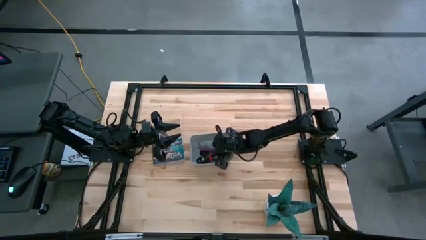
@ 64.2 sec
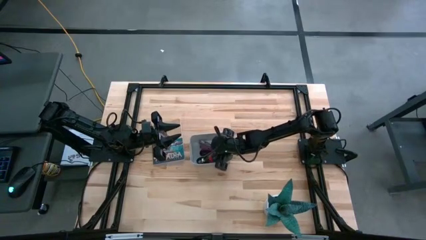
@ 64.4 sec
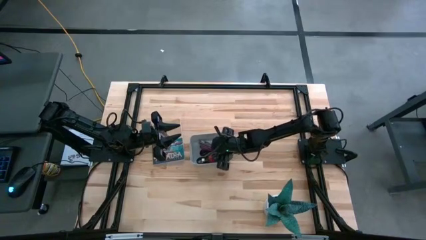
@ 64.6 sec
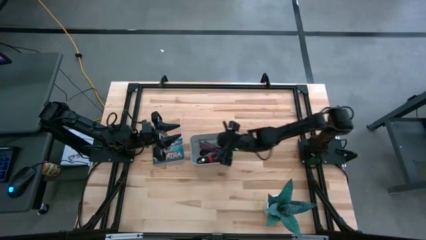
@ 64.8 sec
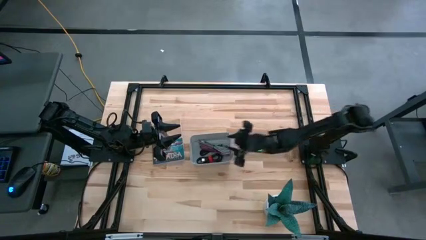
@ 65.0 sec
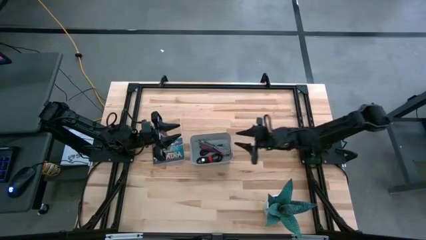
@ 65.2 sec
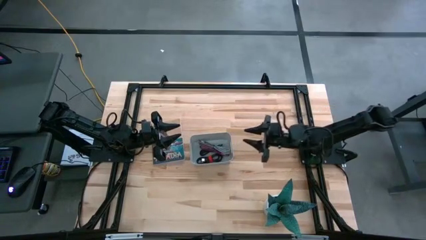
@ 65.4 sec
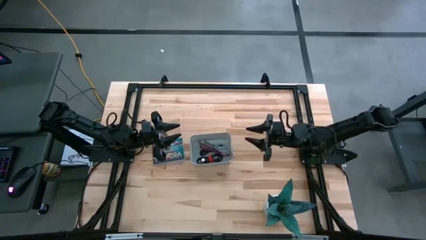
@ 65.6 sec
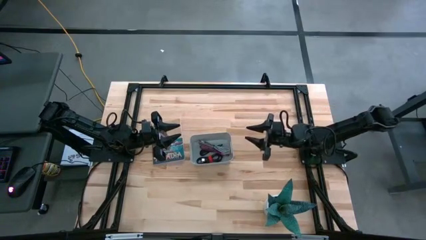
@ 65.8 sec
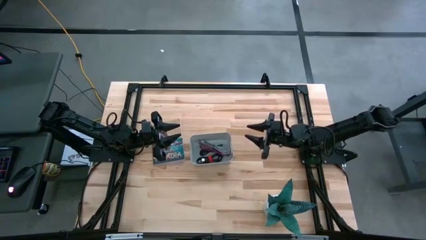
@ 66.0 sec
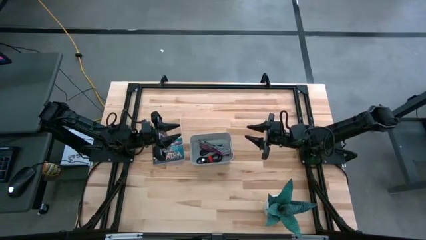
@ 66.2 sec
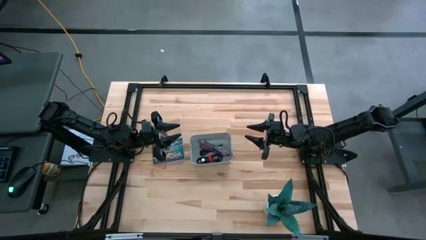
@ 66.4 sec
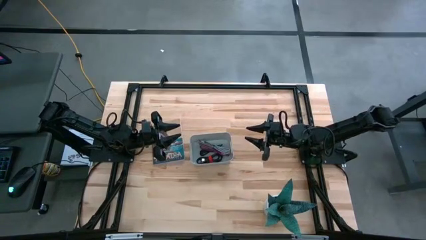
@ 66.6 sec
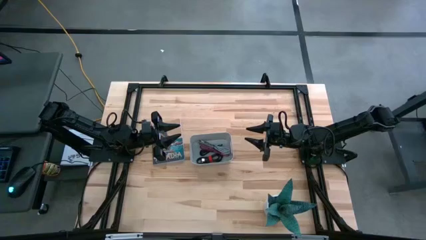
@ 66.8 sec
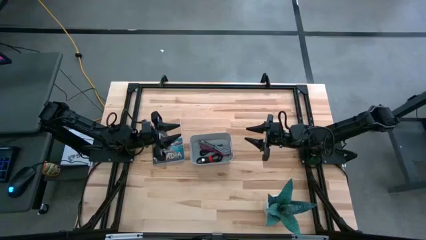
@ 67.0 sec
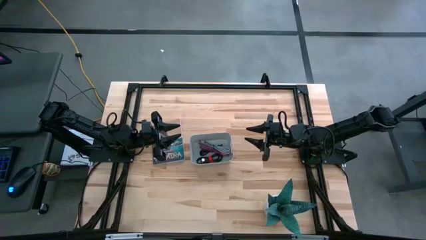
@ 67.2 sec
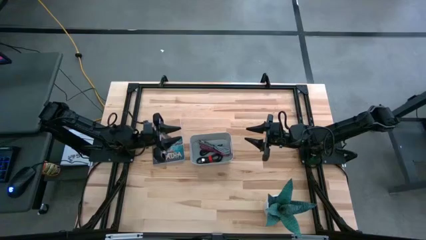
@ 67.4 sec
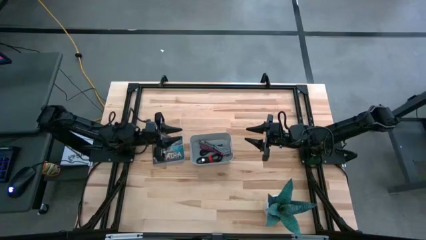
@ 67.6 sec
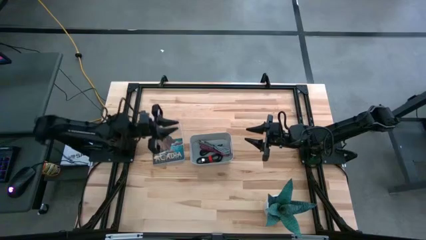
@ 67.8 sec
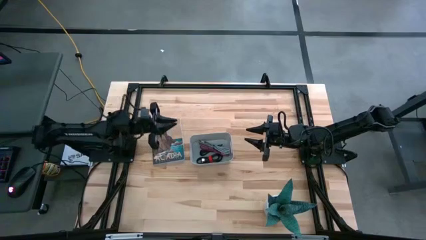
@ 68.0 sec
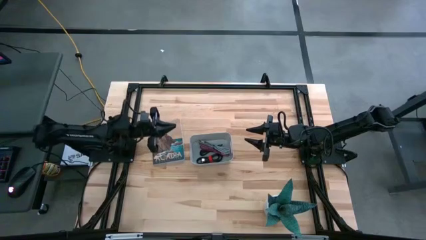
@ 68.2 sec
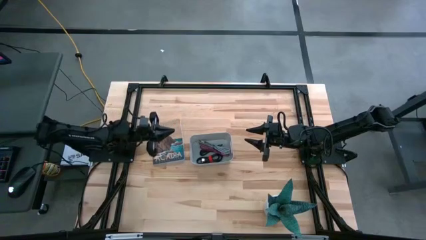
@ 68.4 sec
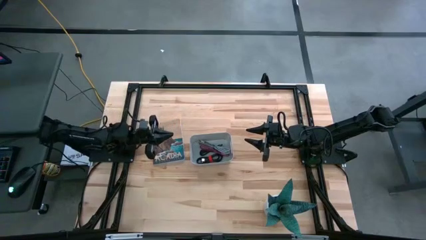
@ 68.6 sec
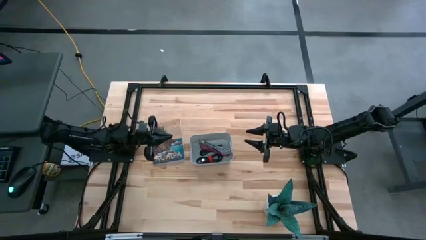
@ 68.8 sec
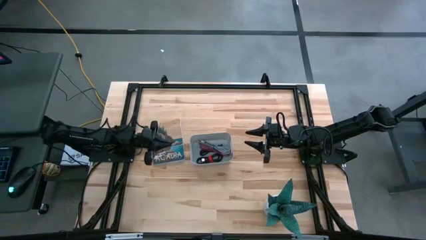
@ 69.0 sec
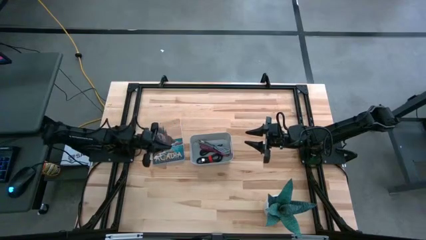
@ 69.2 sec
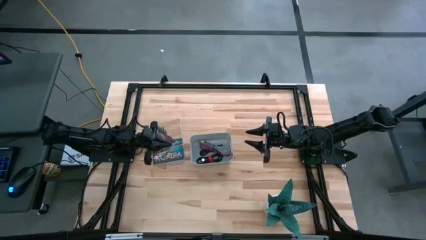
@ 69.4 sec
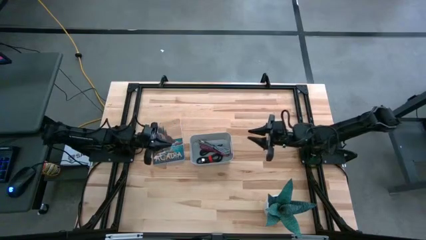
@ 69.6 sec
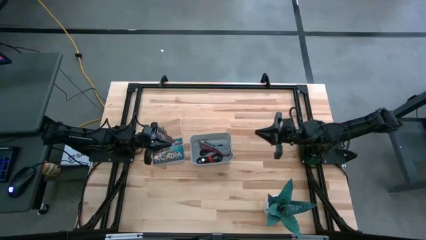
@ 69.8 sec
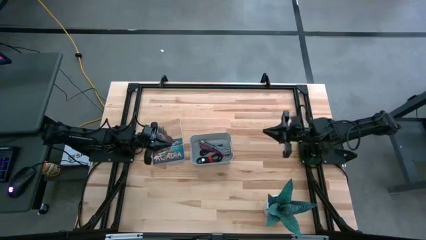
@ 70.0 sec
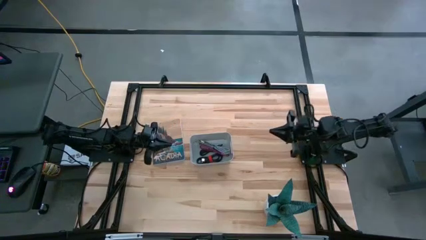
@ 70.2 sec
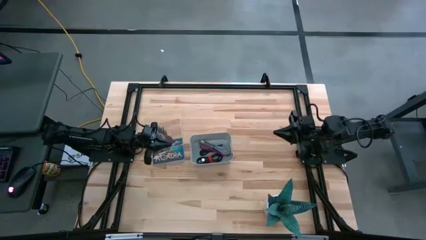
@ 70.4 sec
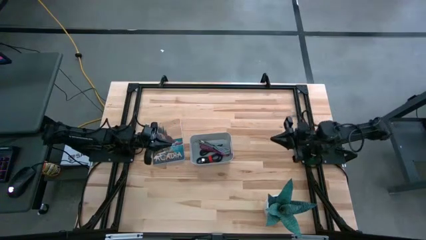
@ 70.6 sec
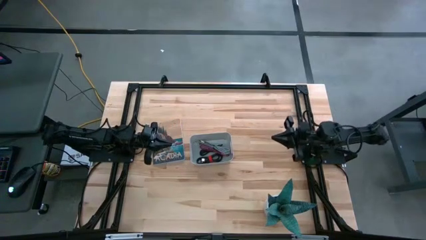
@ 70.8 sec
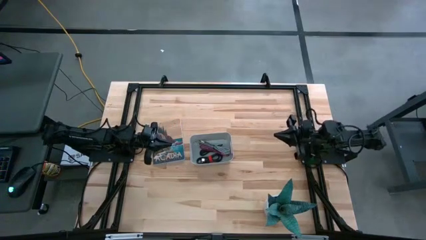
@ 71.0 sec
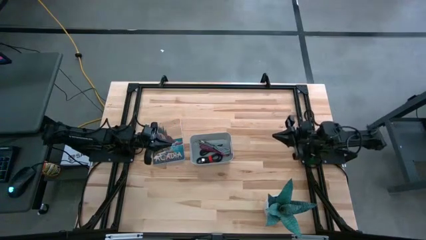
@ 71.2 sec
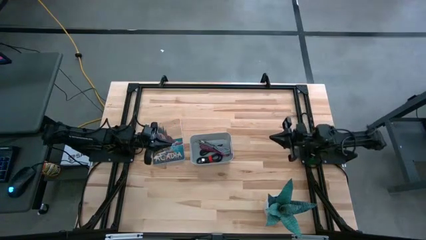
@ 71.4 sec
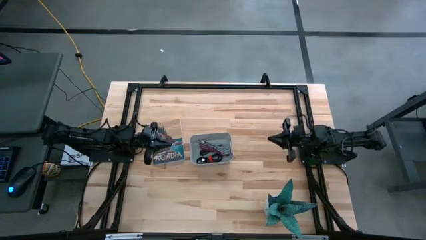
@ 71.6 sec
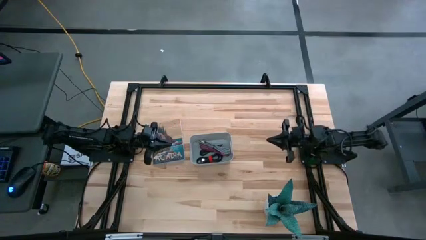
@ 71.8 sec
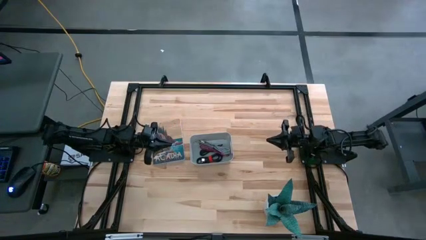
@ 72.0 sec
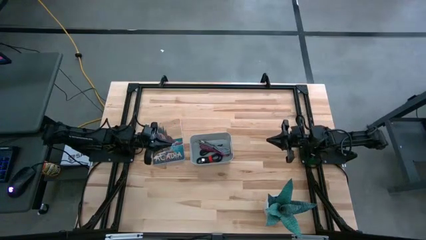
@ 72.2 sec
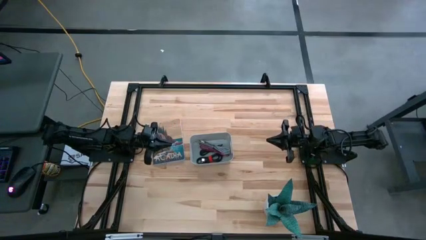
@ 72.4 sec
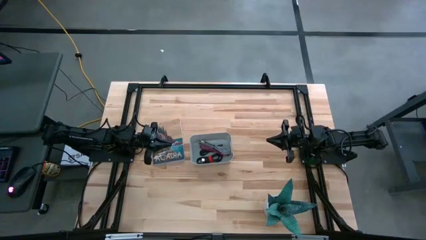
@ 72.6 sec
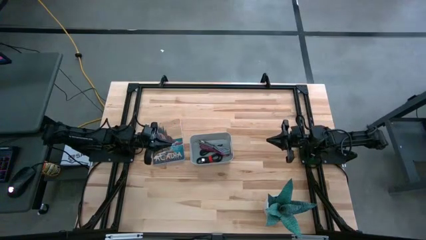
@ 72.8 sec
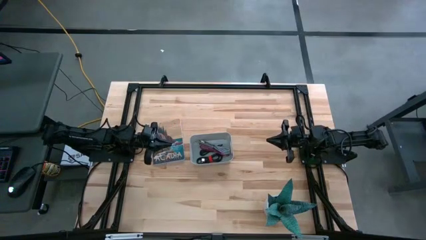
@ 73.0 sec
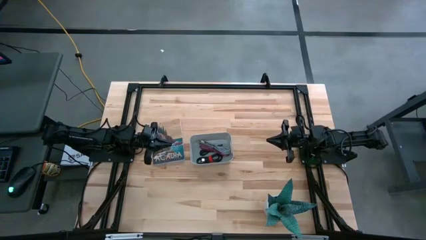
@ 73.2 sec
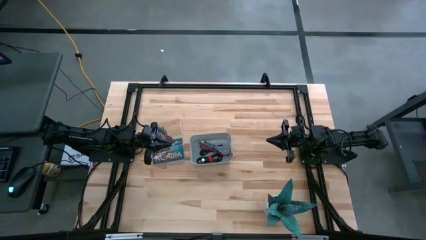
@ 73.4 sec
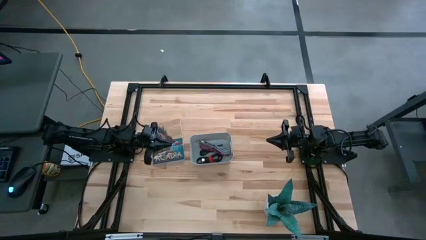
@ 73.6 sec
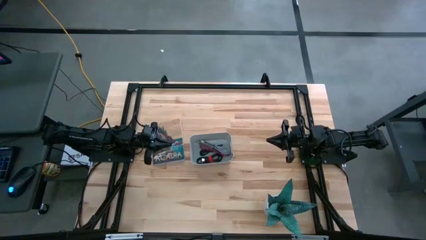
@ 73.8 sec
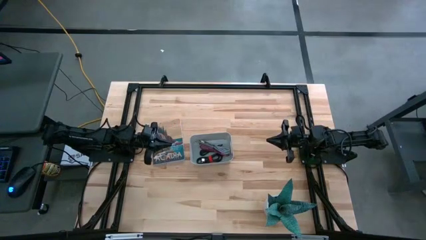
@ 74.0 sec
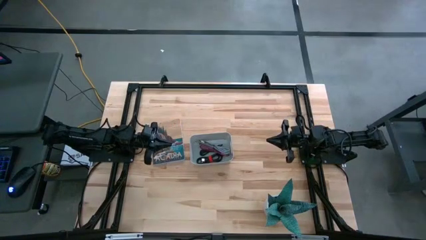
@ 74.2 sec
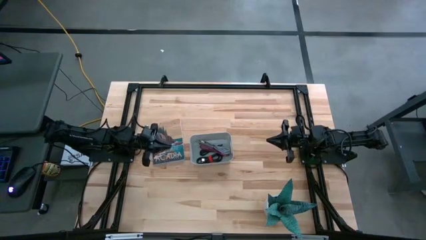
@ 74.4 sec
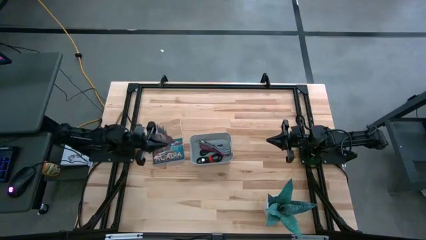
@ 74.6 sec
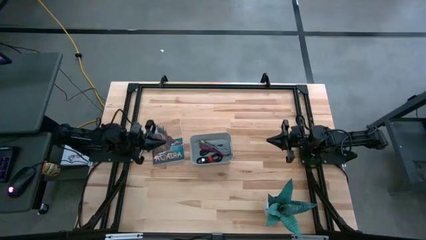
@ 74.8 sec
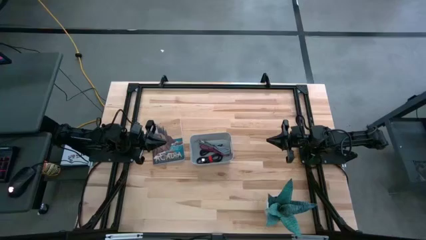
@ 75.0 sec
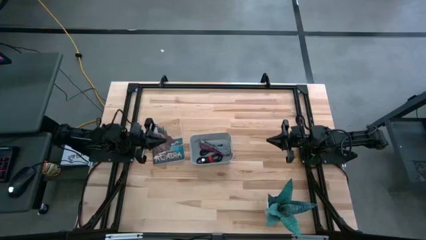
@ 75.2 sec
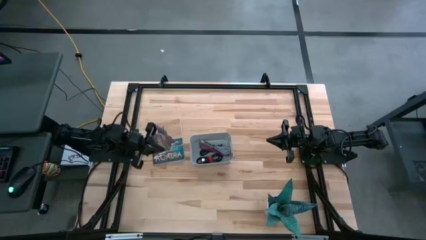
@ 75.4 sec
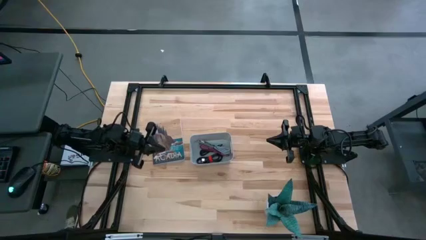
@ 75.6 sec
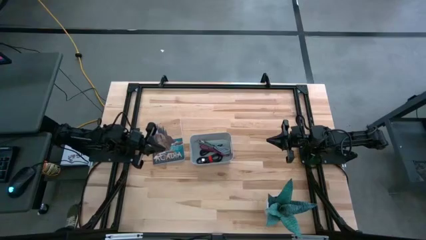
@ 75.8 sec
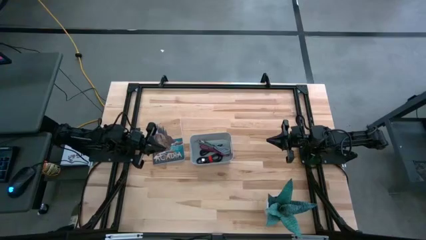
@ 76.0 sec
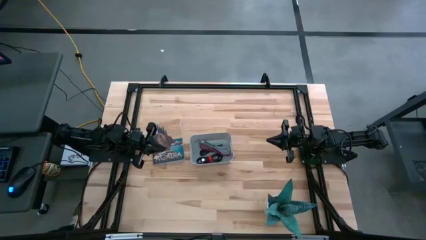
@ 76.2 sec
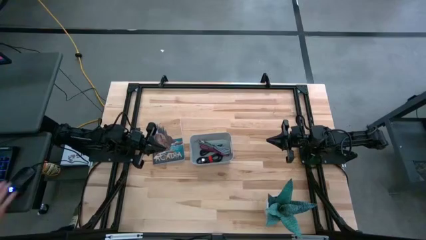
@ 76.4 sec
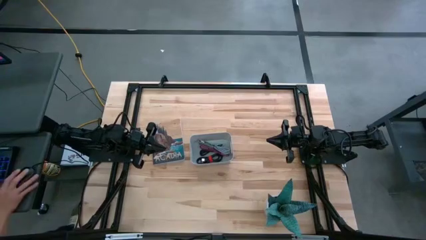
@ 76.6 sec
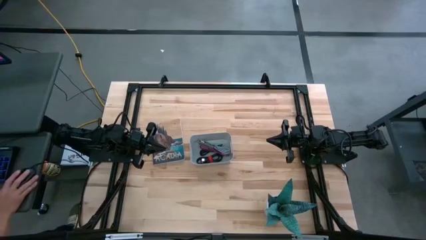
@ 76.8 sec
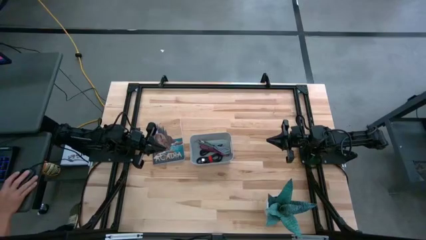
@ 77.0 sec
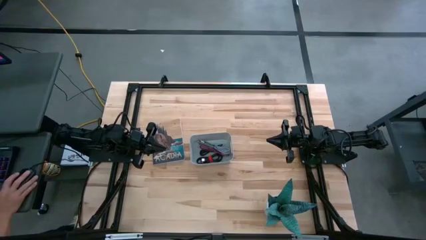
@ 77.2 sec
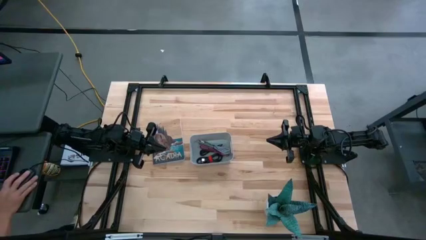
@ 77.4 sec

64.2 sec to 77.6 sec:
Task: Pick and place USB-C Cables
Return to Home Position

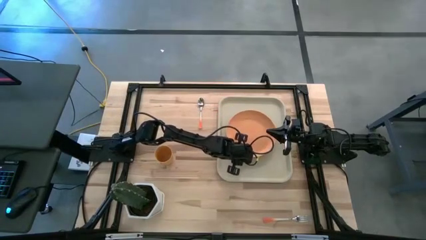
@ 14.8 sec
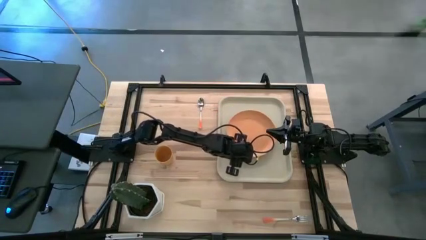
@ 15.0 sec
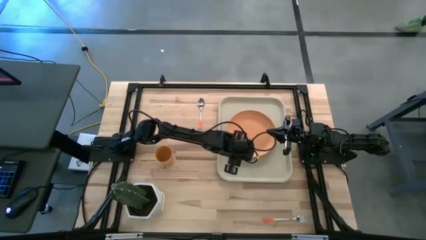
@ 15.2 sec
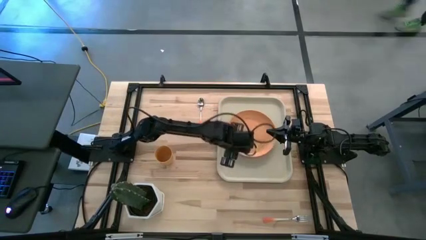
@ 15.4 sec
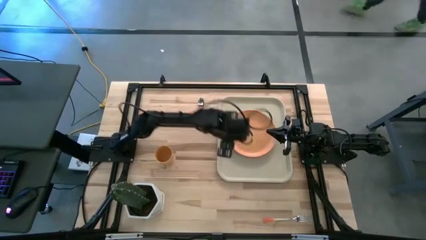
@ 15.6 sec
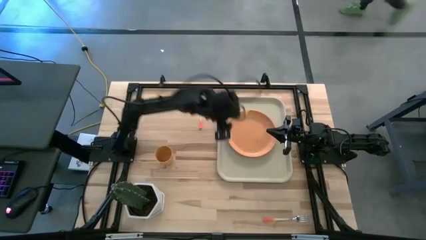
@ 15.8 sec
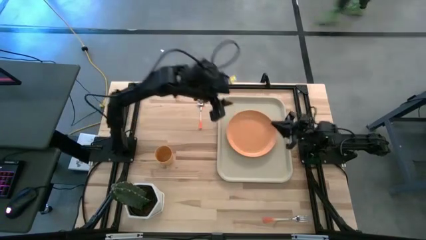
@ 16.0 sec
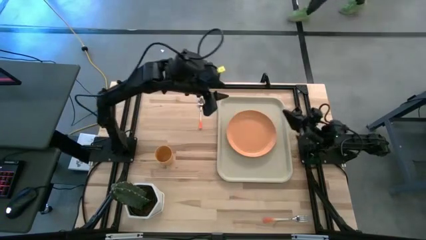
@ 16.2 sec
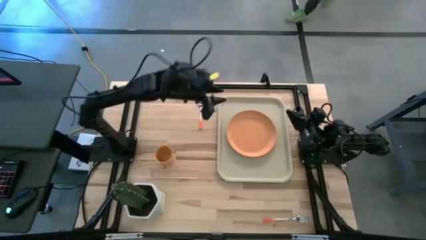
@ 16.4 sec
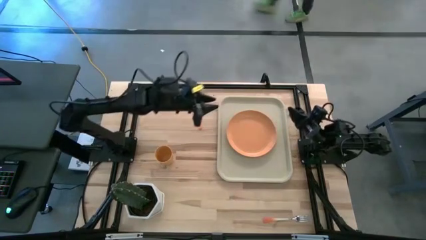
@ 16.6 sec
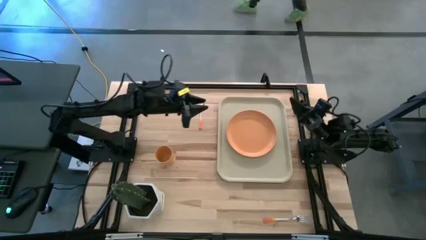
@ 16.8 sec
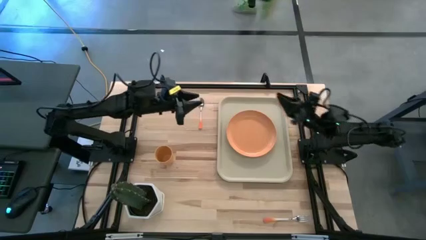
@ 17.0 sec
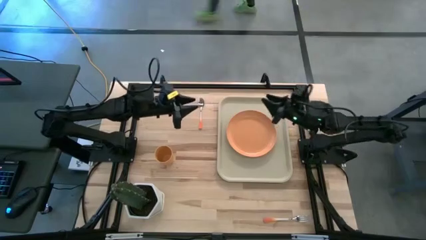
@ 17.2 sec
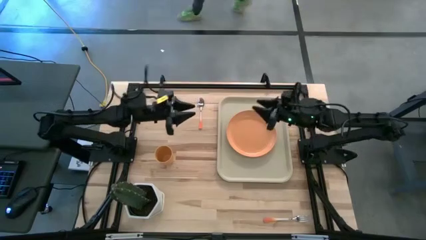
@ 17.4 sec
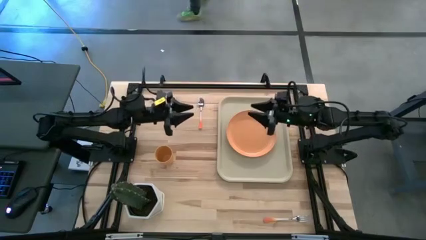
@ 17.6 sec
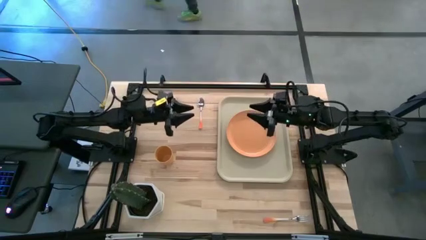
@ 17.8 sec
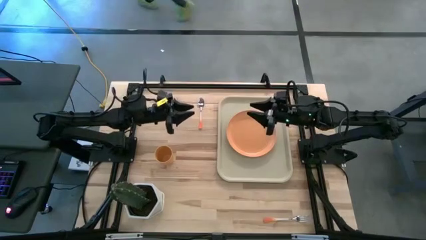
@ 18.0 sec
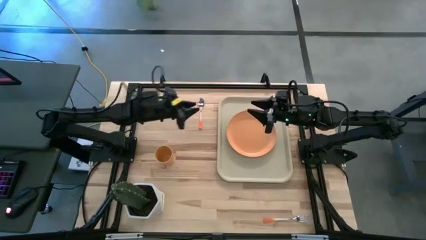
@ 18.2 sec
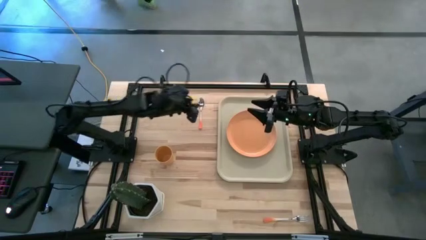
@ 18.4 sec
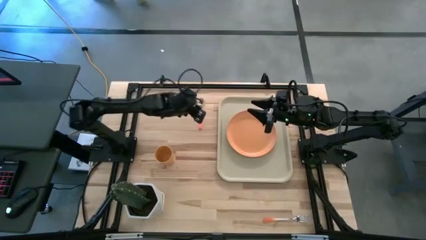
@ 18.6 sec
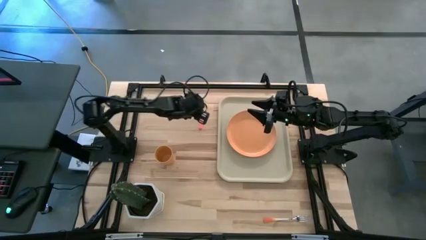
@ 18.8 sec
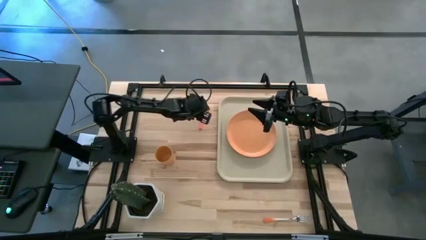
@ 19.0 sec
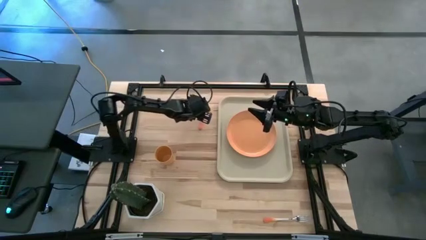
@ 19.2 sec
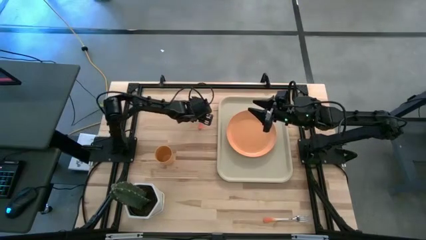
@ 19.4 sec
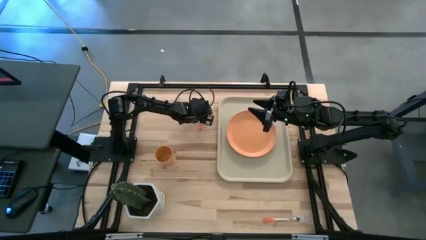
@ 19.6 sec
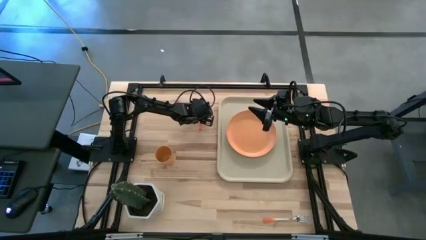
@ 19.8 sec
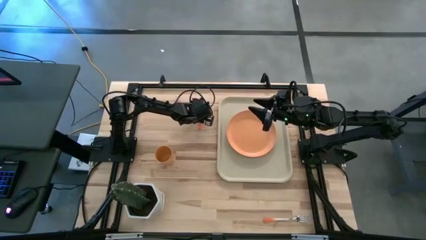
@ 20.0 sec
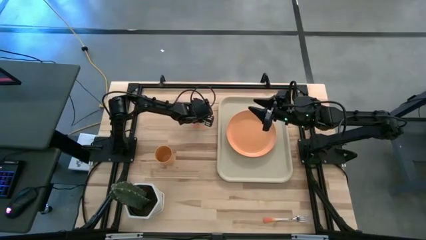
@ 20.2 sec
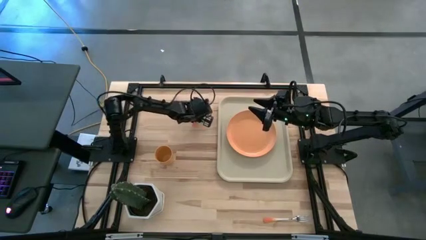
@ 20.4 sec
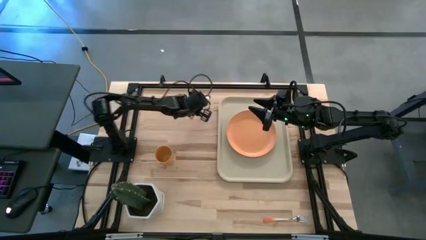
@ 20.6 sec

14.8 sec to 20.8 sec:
Task: Pick and place plate/cup/fork/spoon on tray
Put the orange spoon on the beige serving tray beside the orange plate
